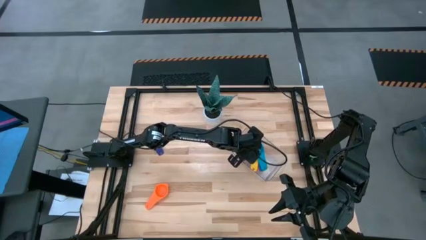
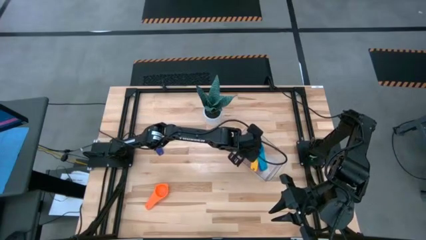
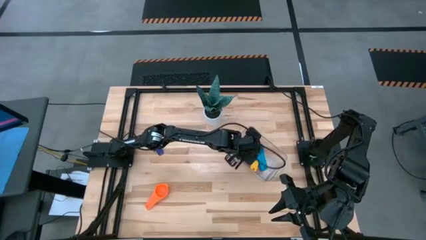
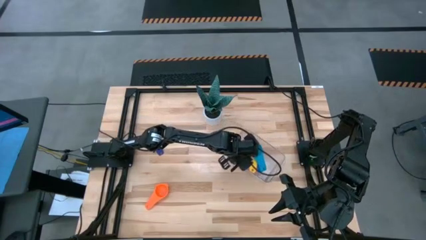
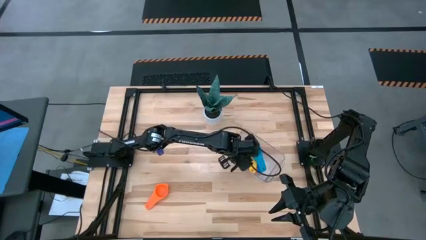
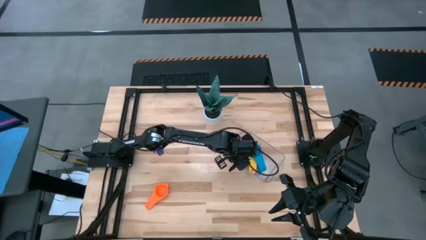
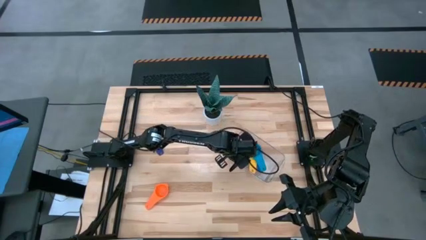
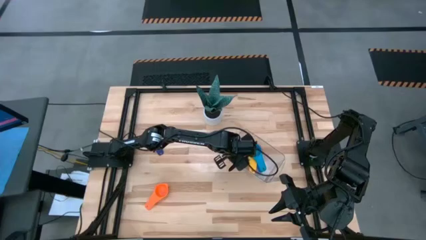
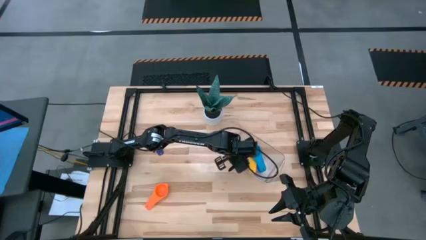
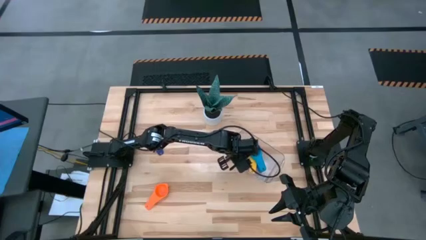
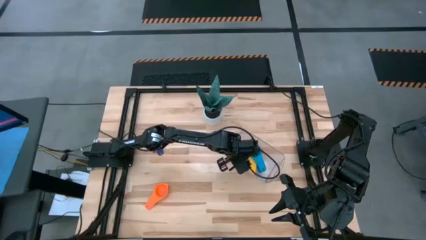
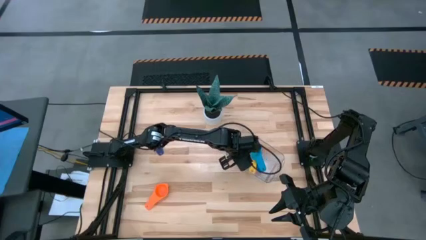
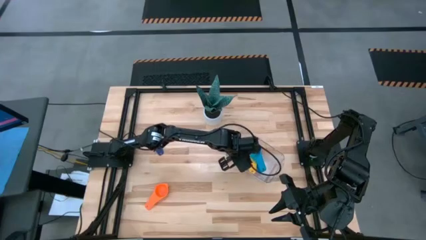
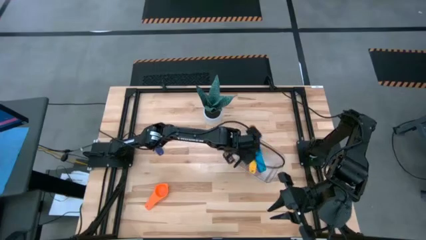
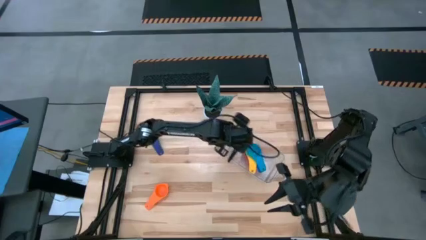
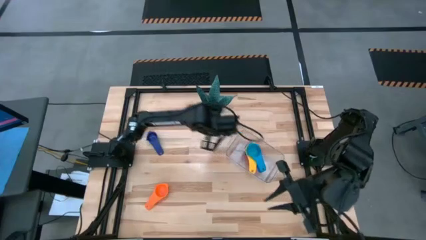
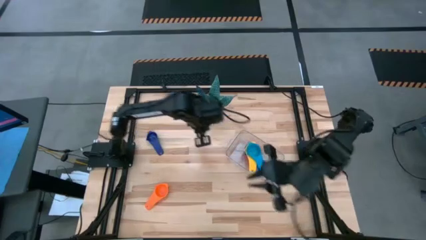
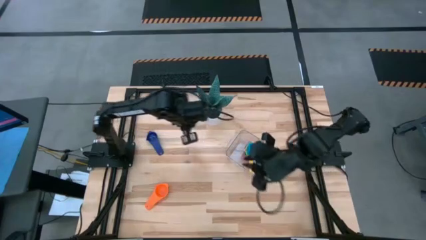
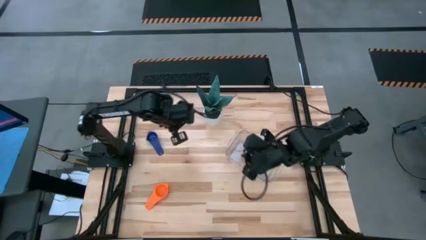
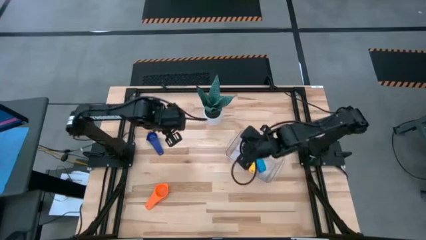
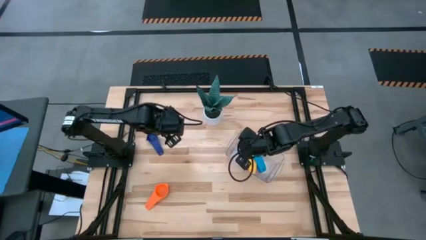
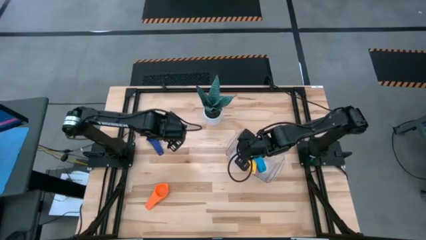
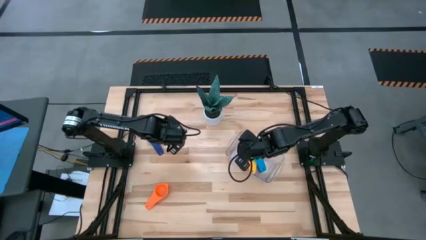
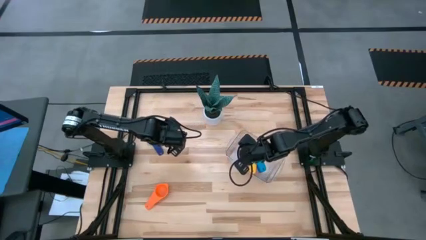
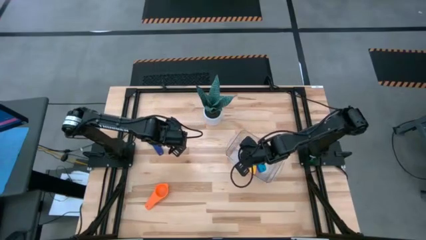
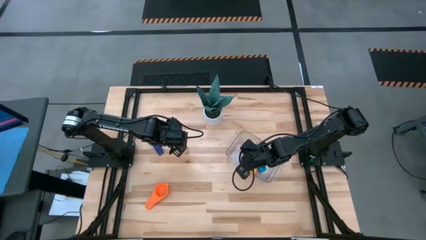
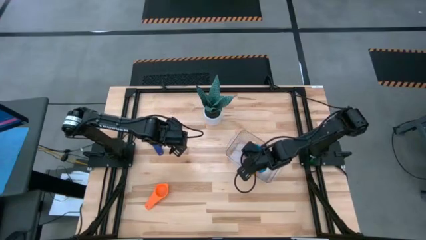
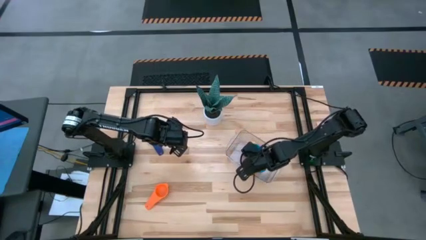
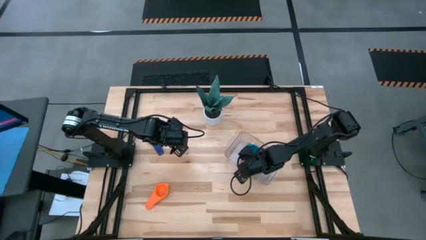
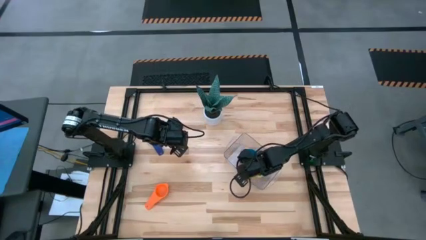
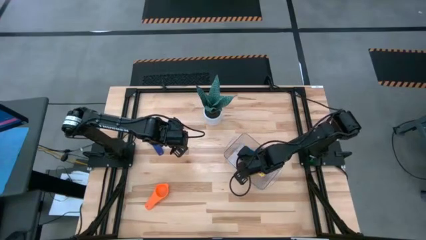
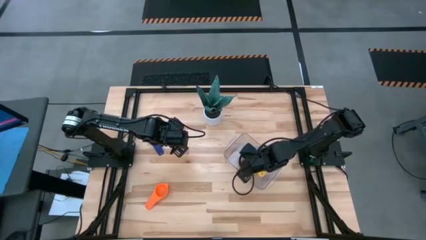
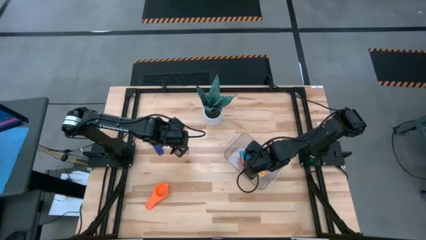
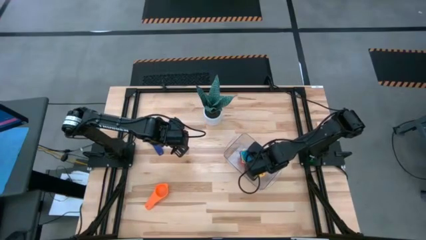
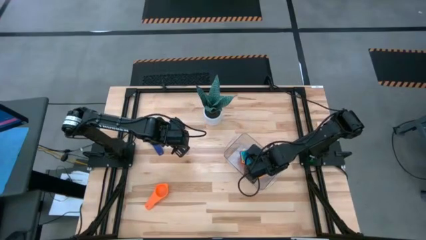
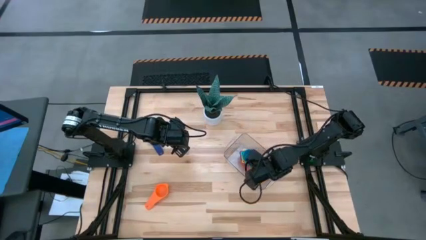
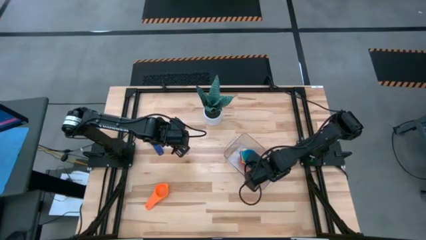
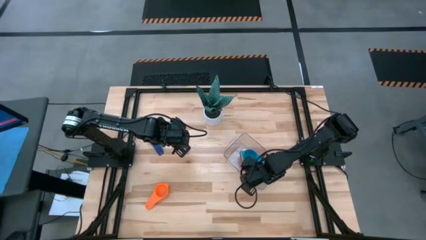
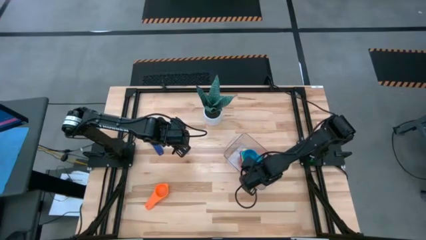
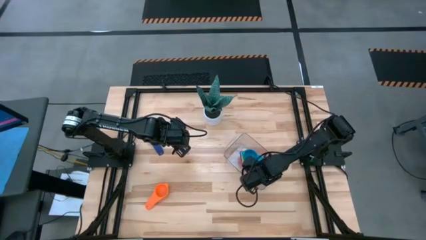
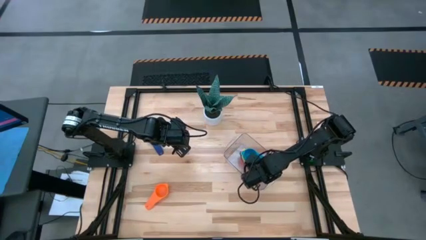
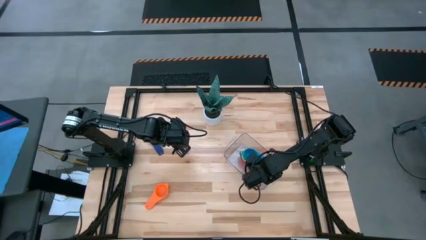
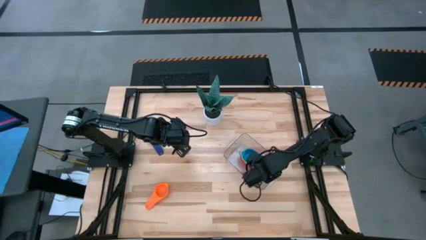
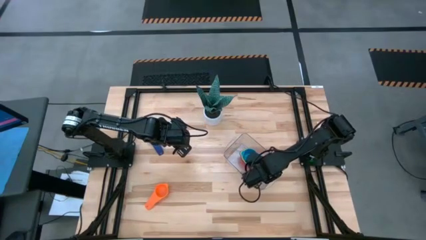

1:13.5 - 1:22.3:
Task: Nest measuring cups in basket
Adjust the measuring cups

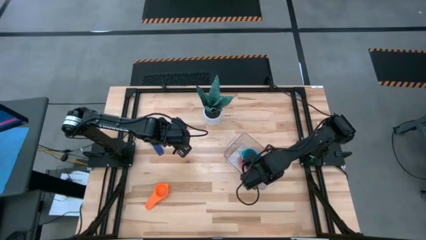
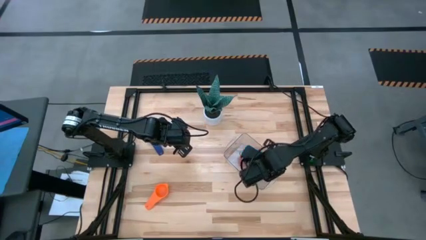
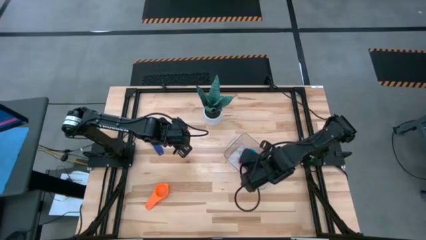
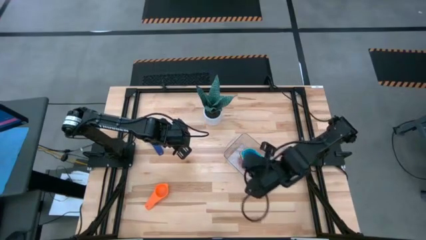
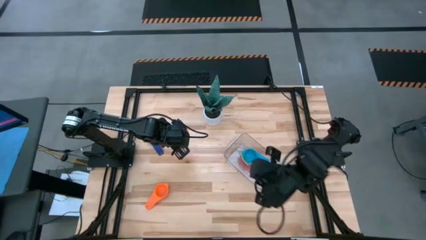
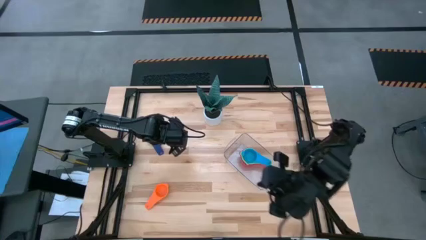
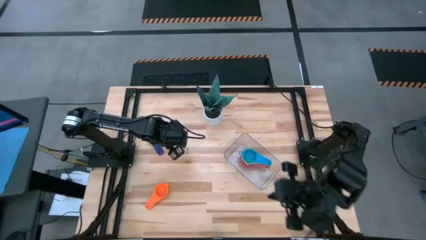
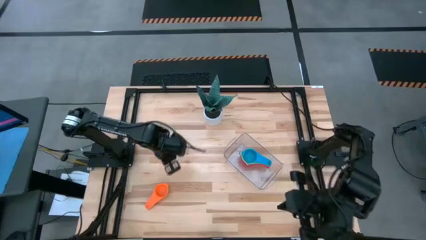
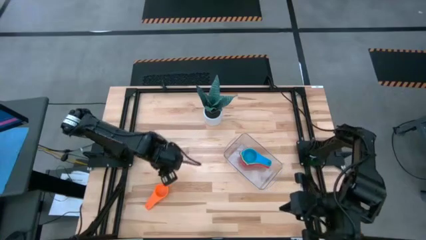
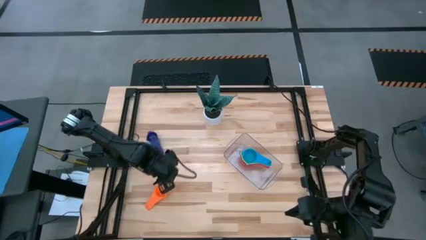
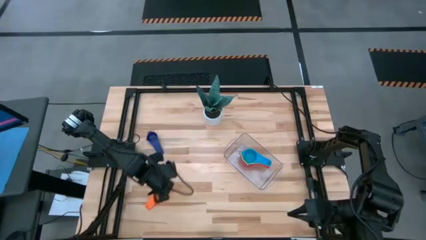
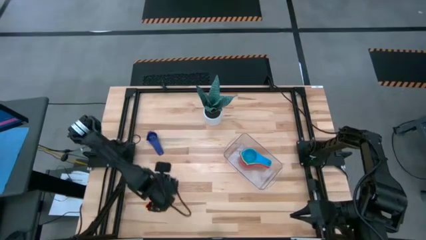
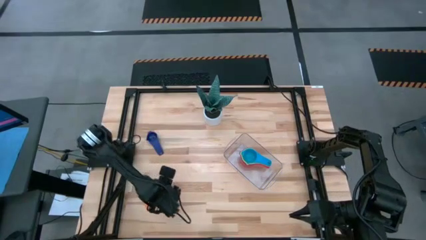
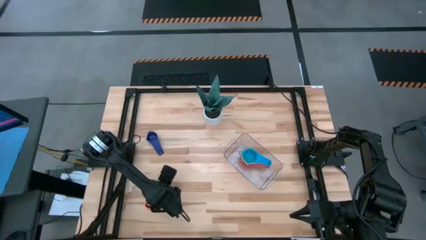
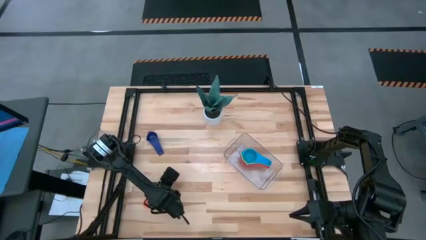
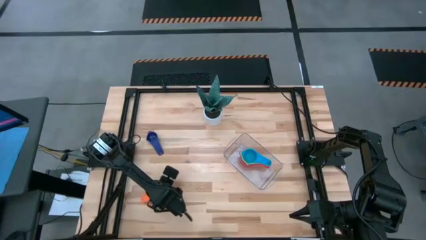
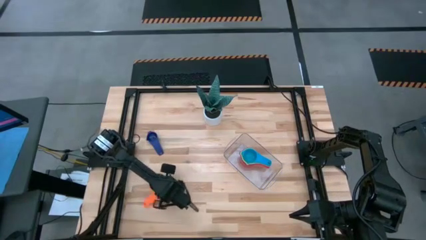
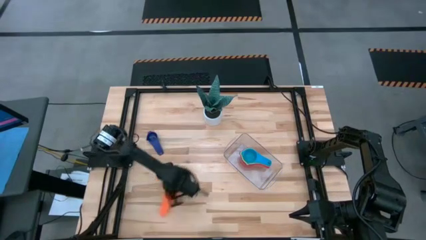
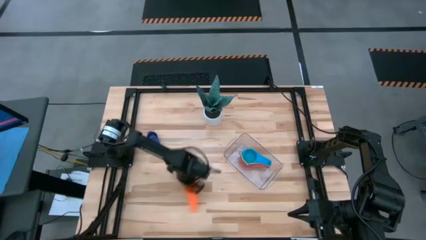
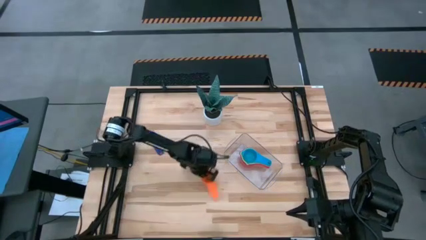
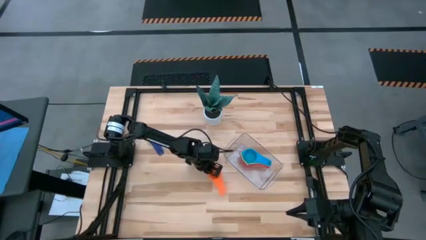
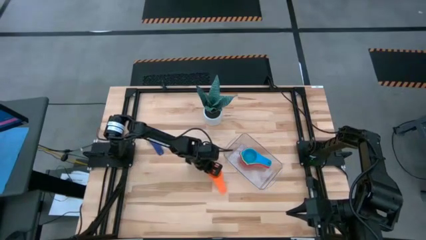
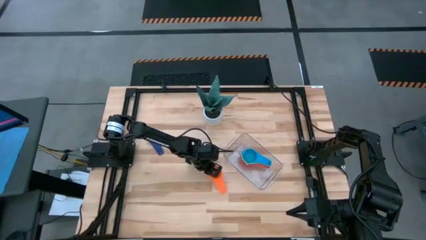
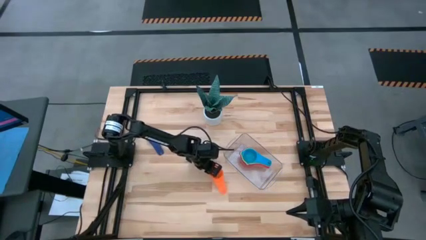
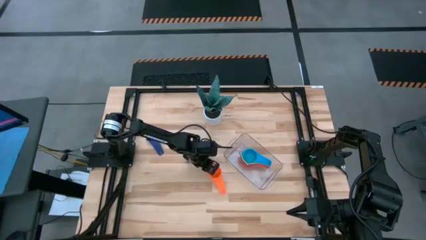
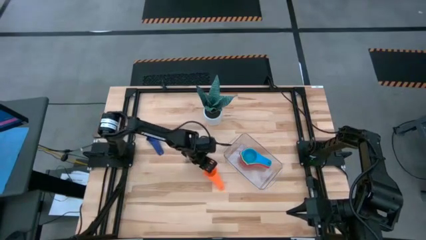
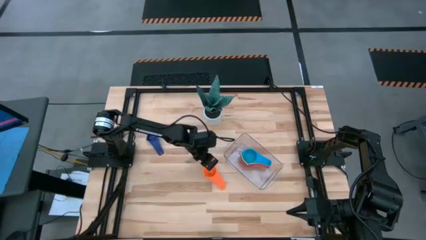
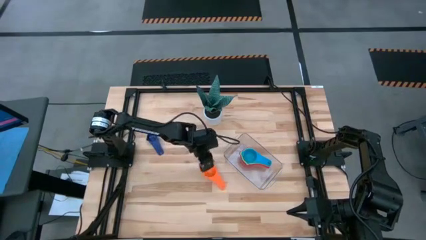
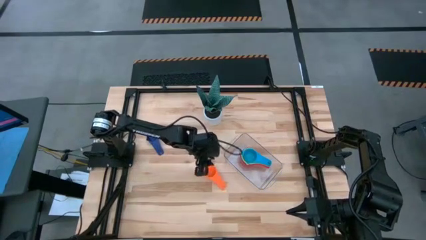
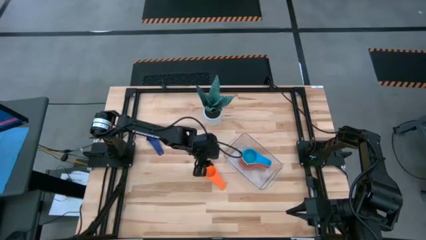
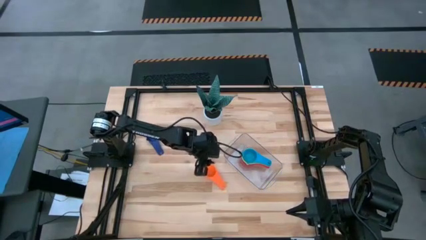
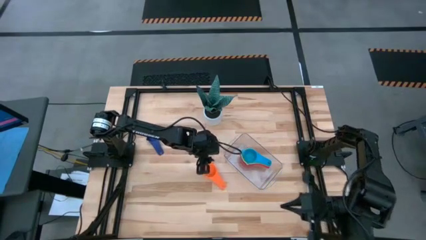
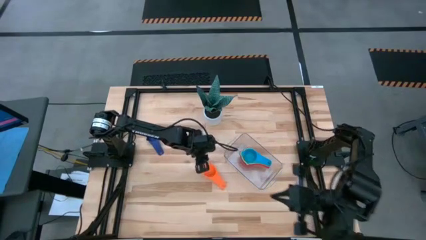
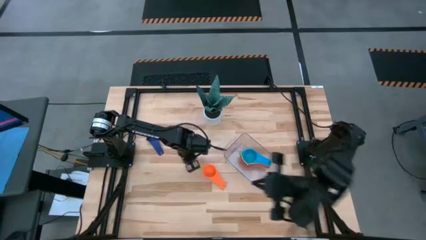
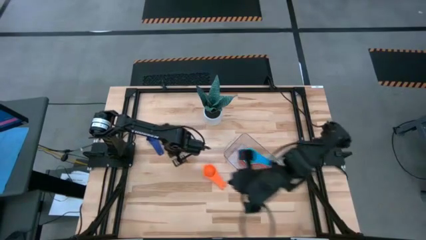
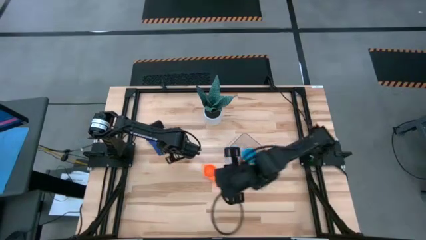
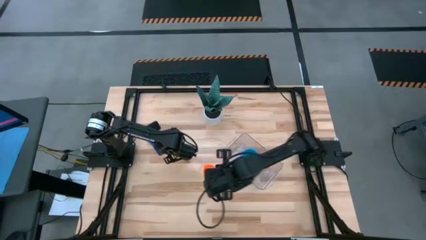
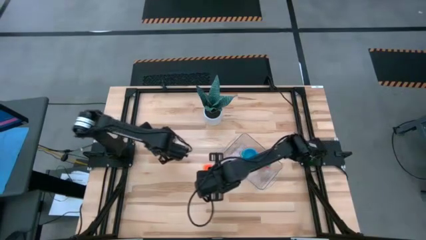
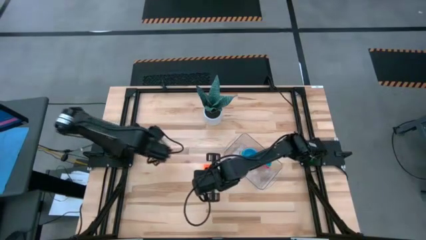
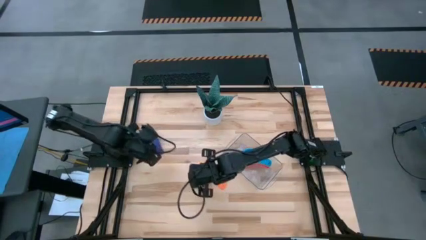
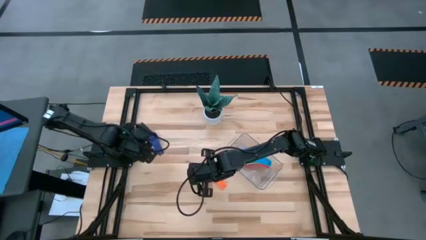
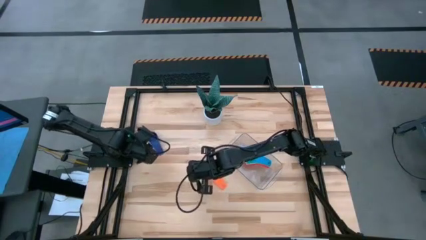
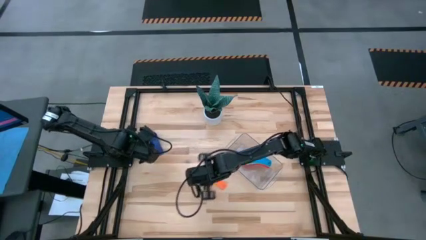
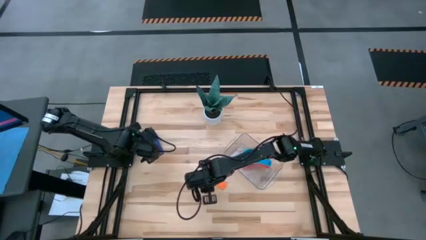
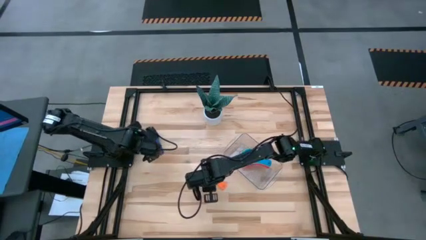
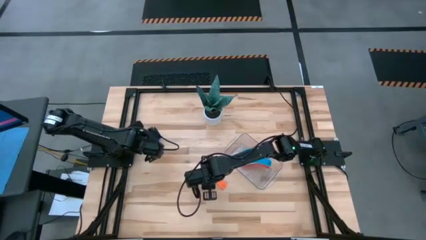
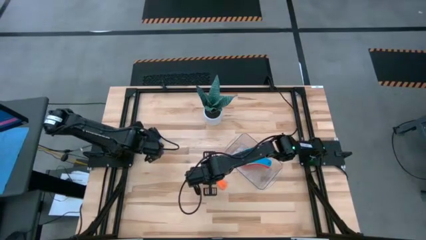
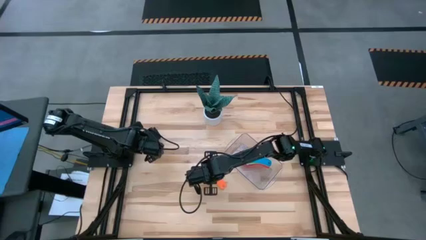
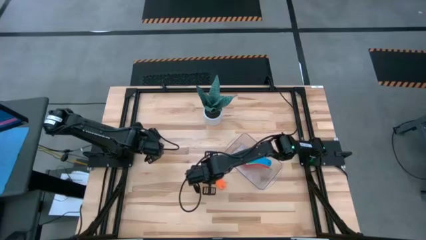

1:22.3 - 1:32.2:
Stack the orange measuring cup on top of the light blue measuring cup
